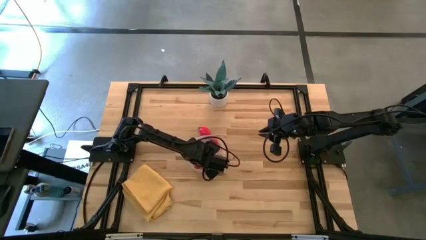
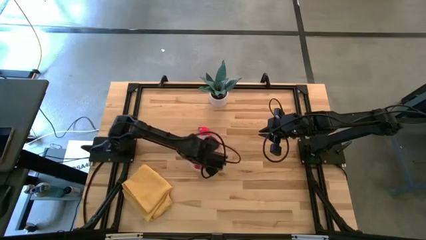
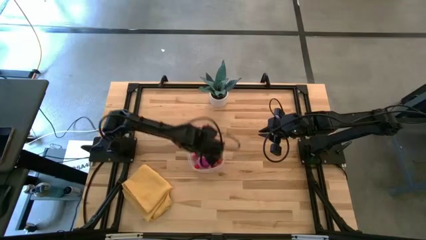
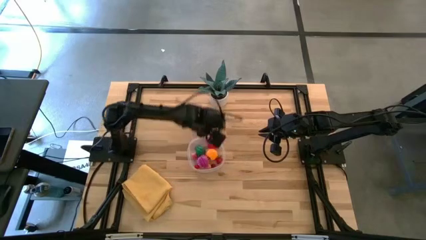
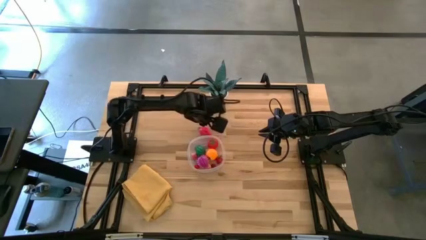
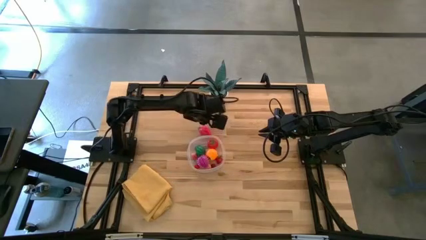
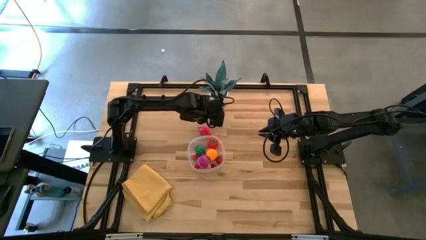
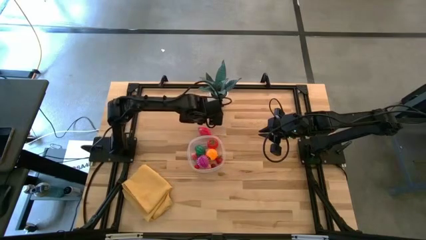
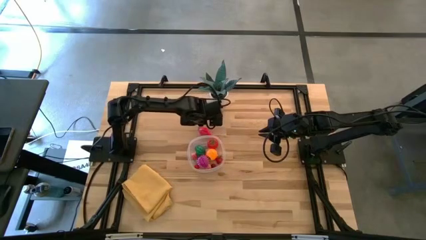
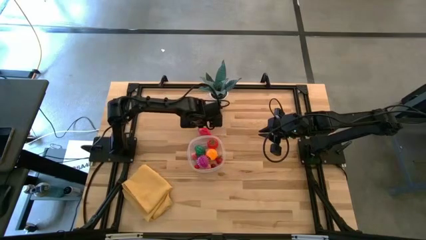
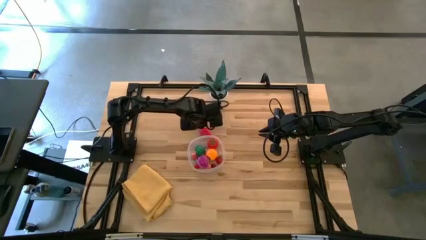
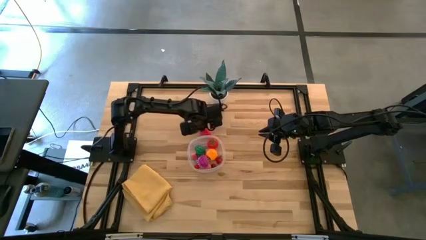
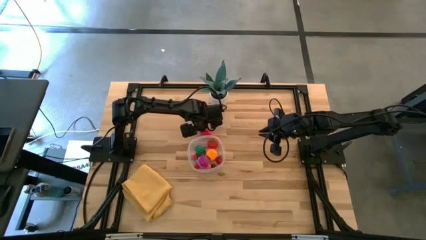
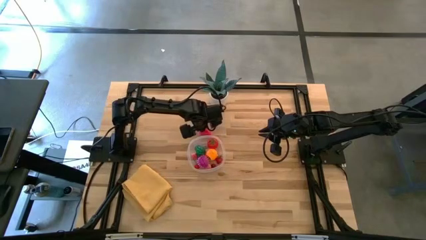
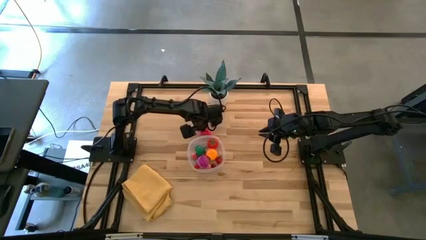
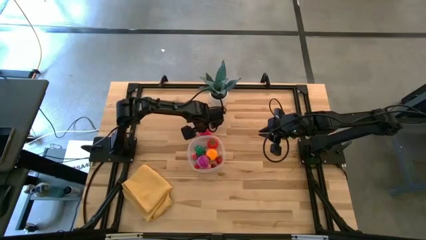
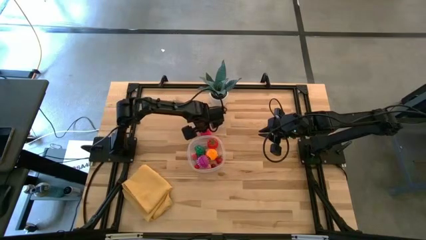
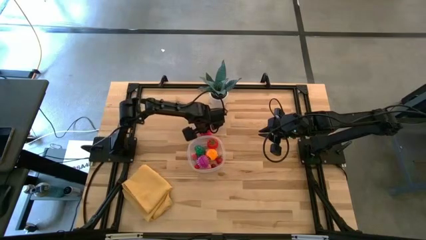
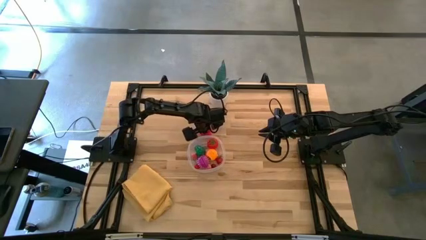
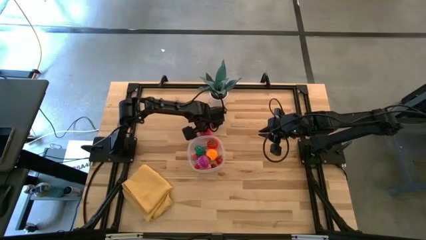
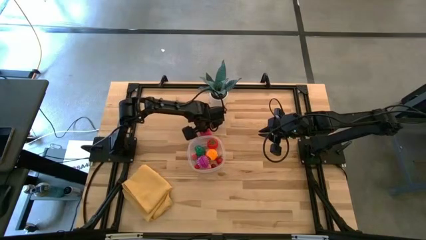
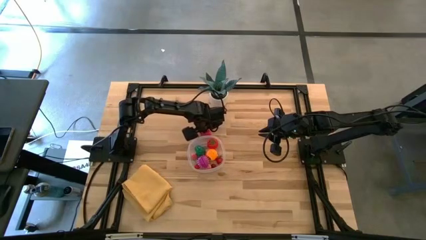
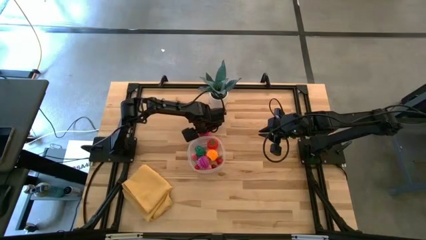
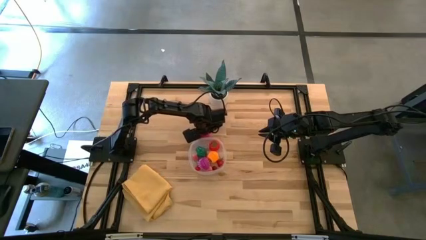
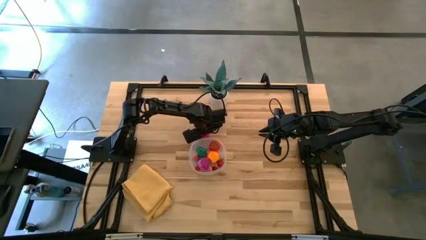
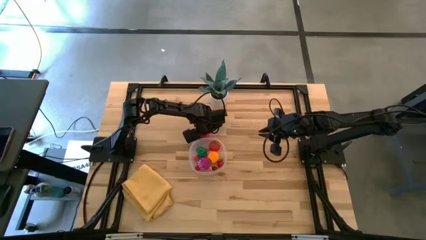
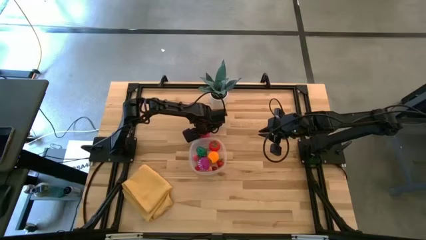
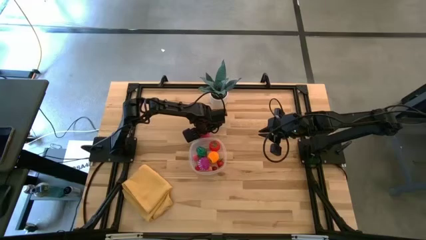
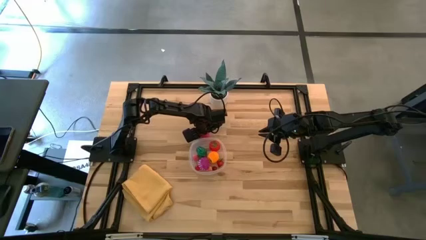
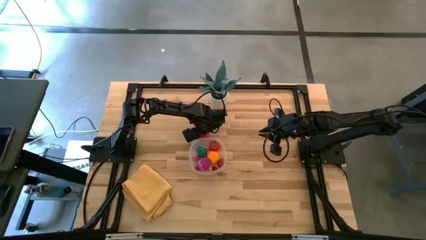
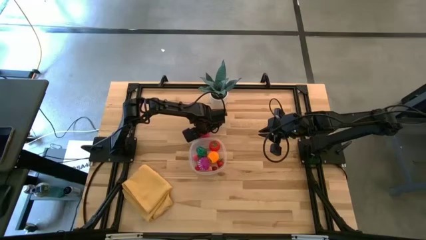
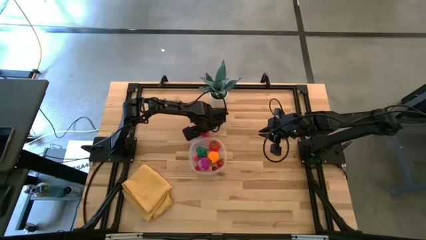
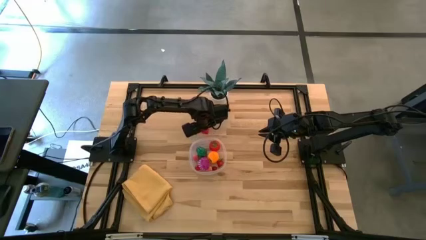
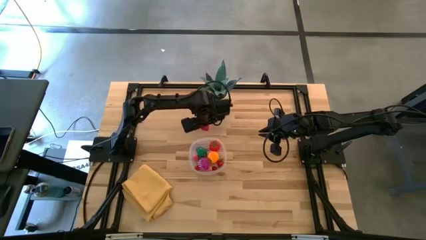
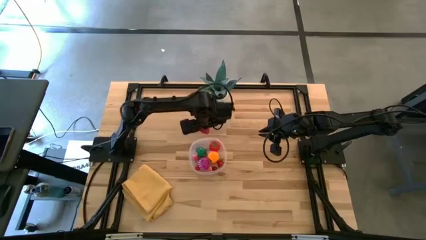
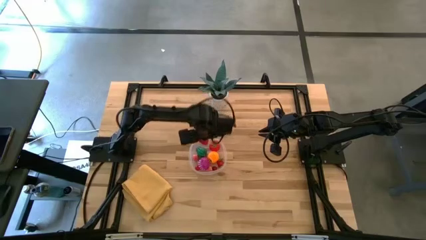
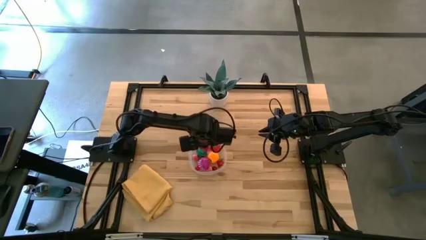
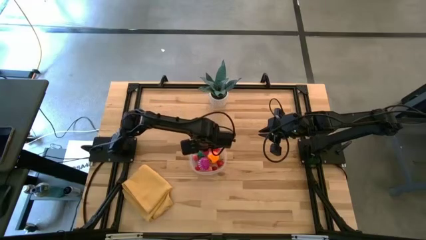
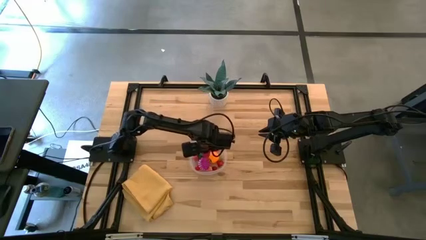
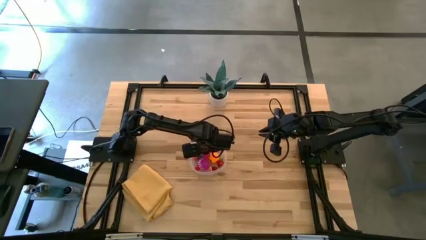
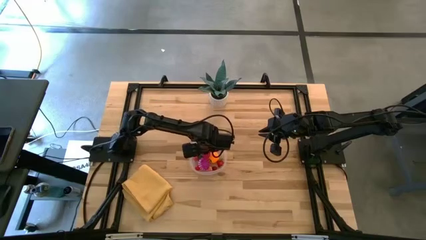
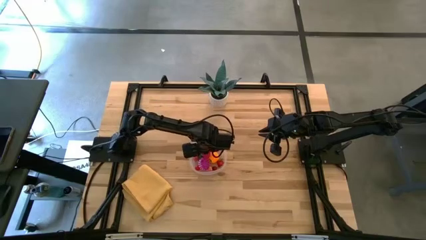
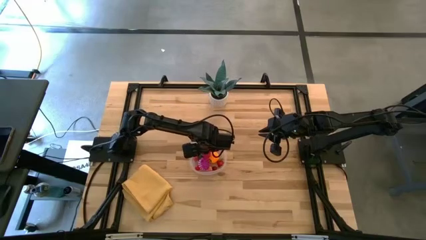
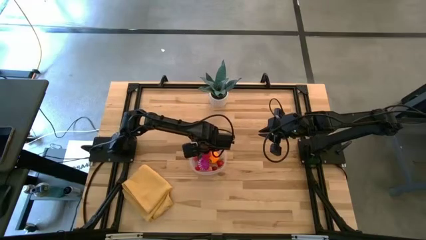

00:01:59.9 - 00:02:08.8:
Task: Pick and placing Produce into tupperware
Put the red dragon fruit into the transparent bin

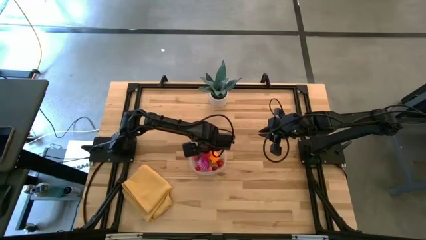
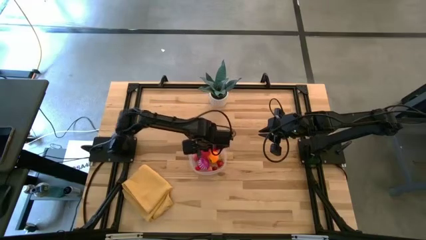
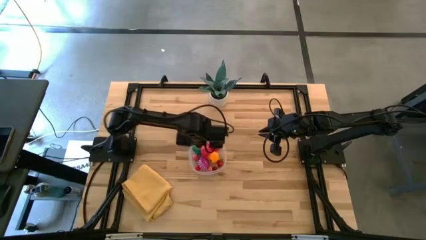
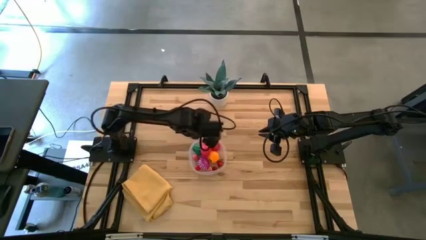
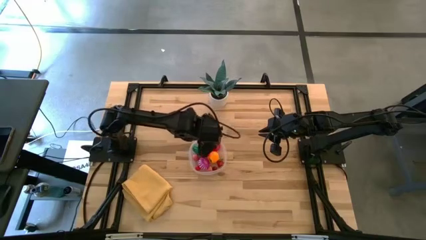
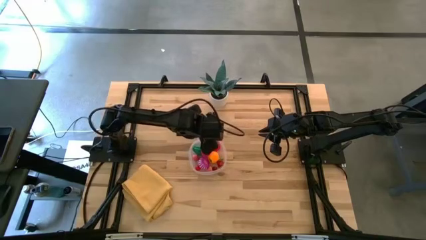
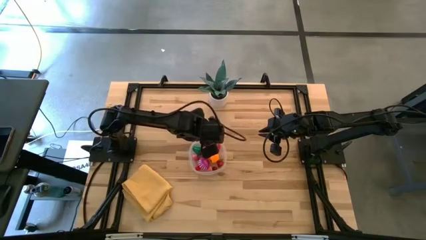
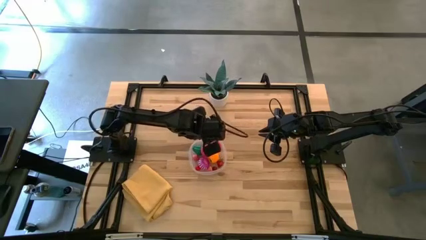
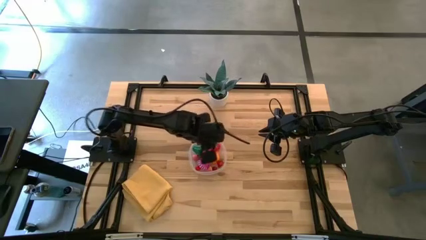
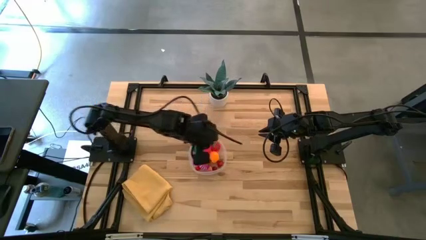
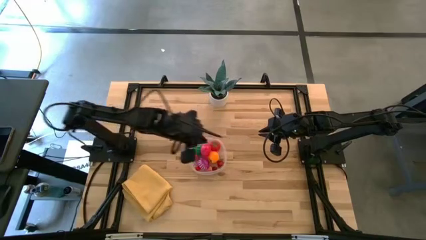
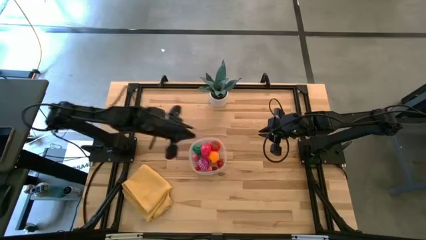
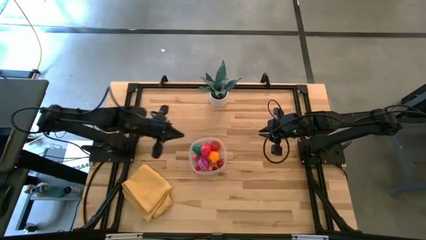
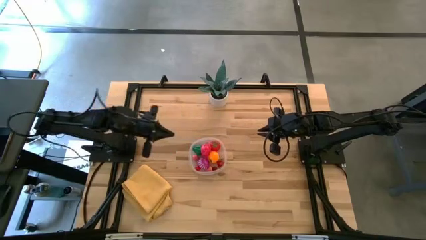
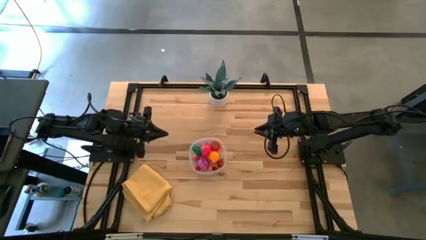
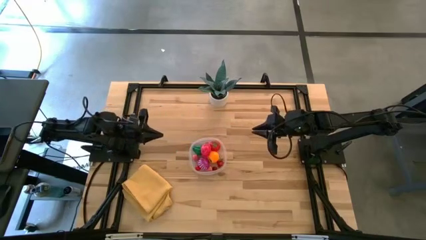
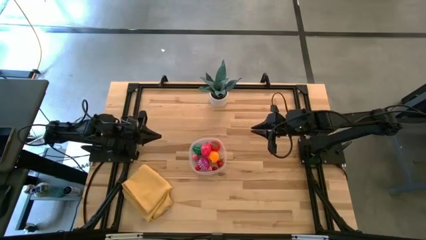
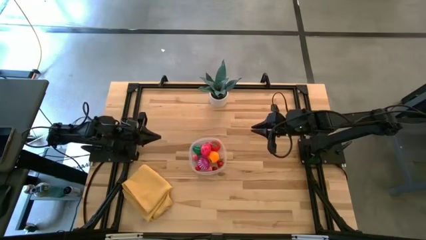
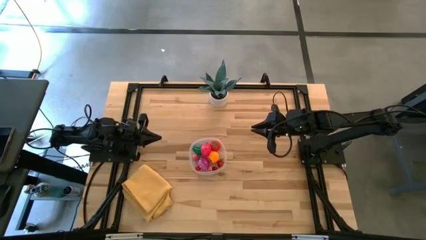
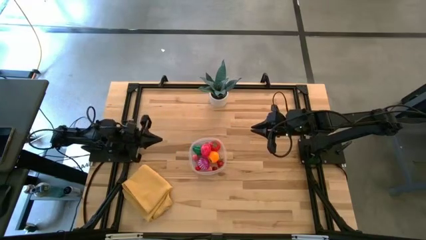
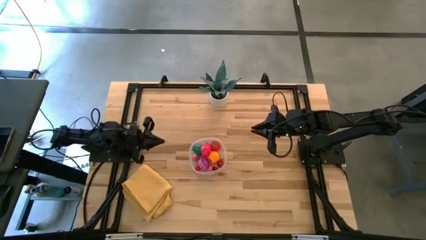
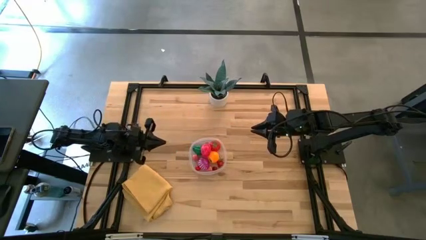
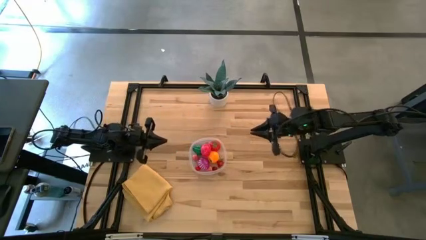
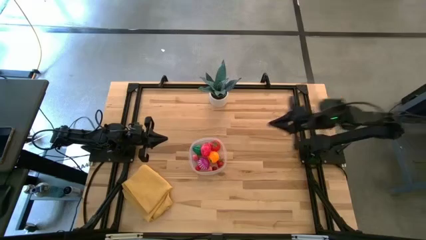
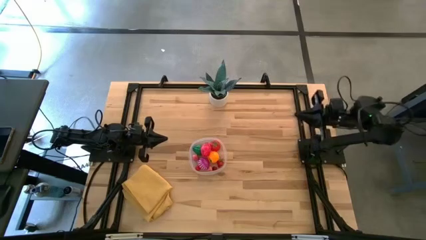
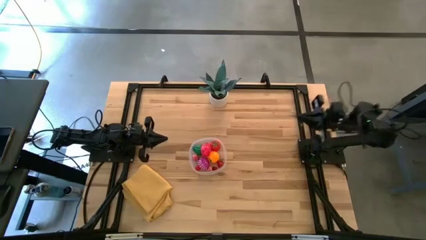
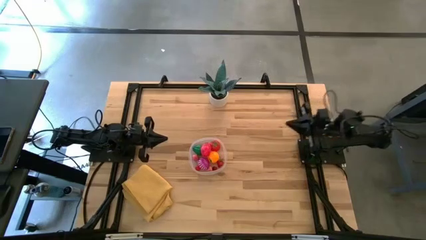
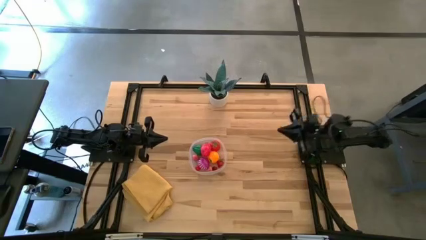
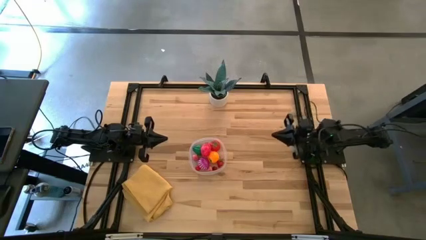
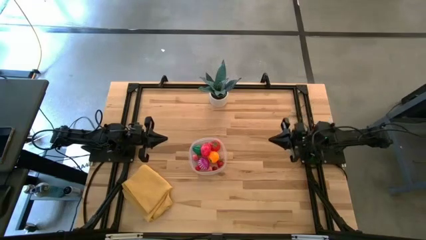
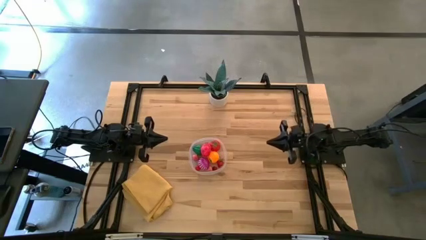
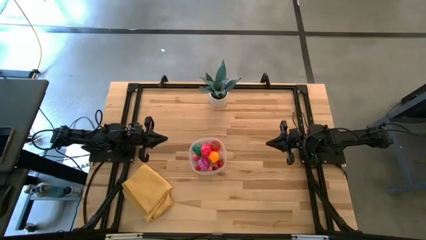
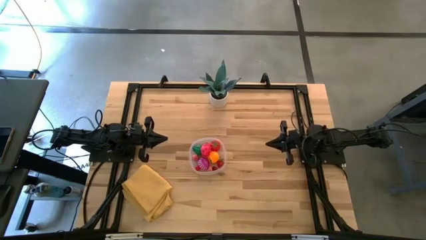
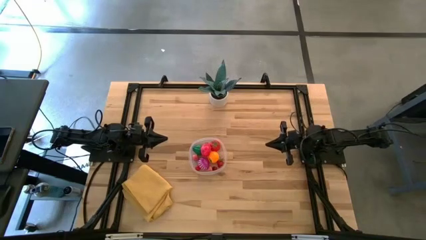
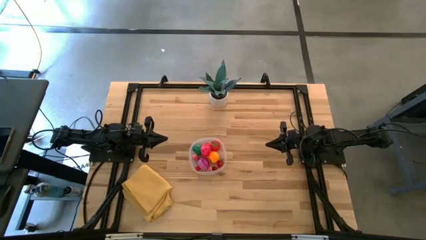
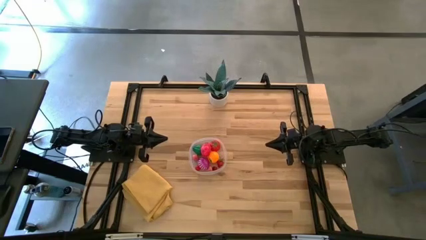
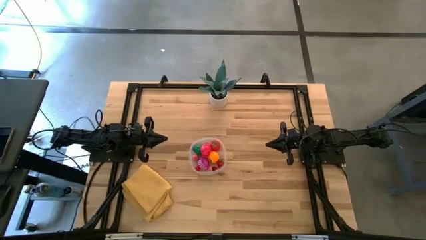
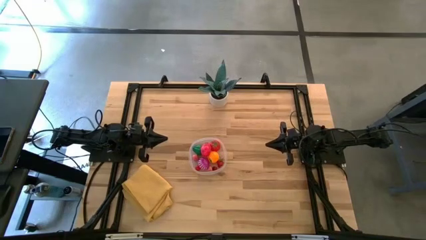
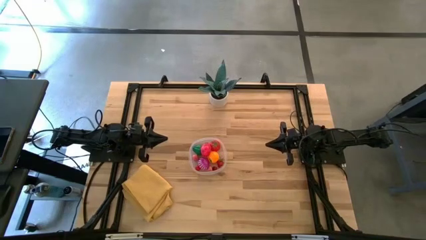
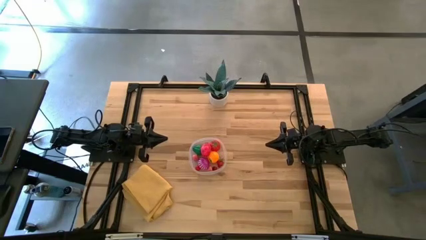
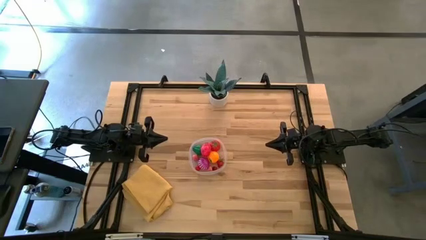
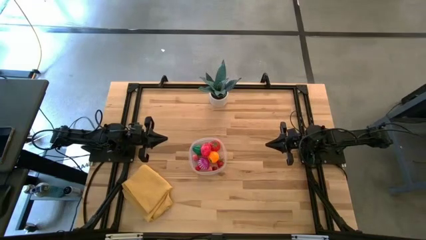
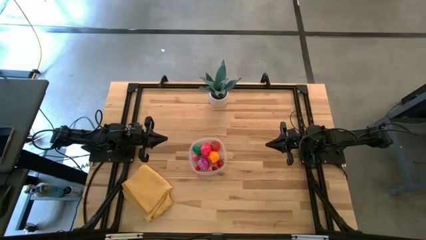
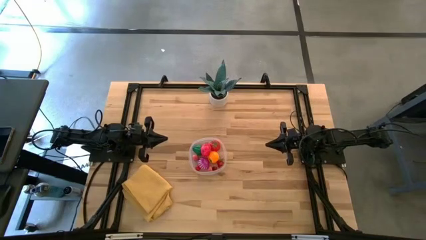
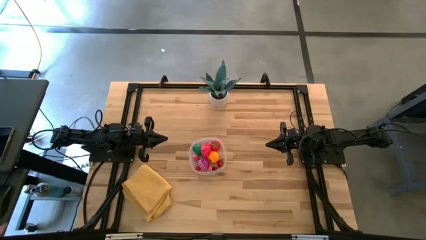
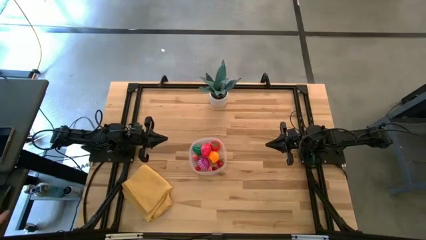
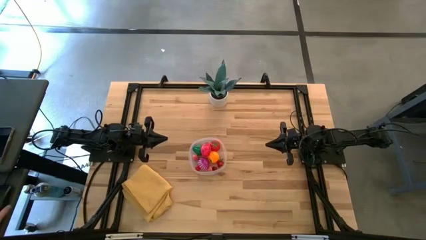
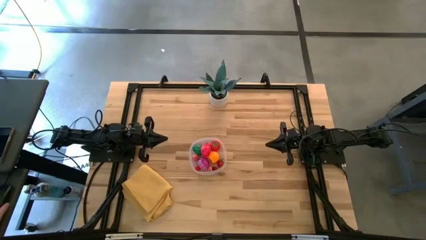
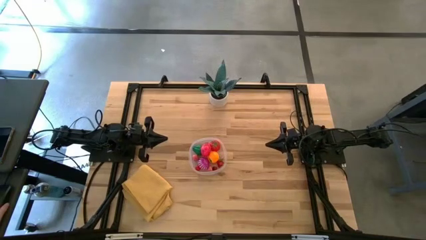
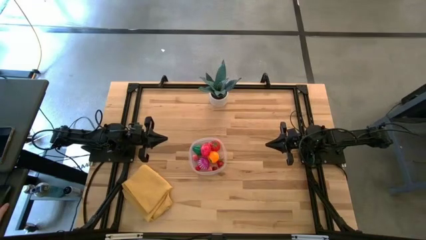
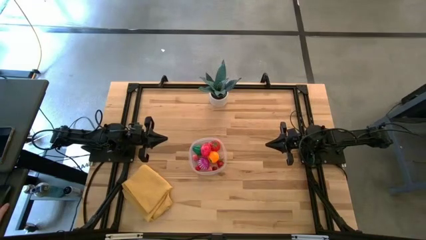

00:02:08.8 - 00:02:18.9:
Return to Home Position
